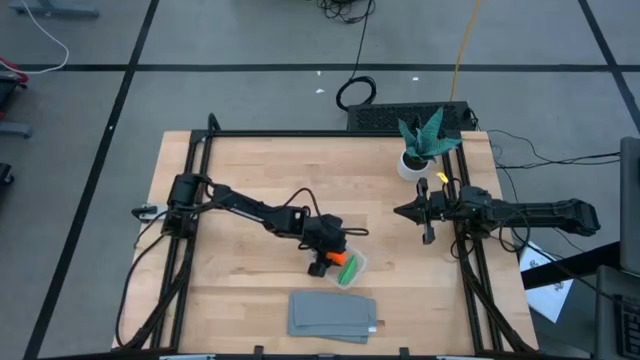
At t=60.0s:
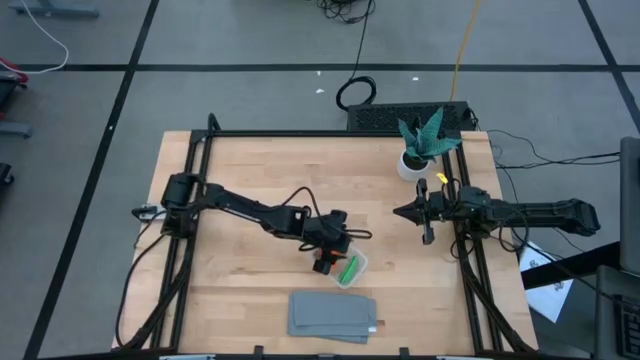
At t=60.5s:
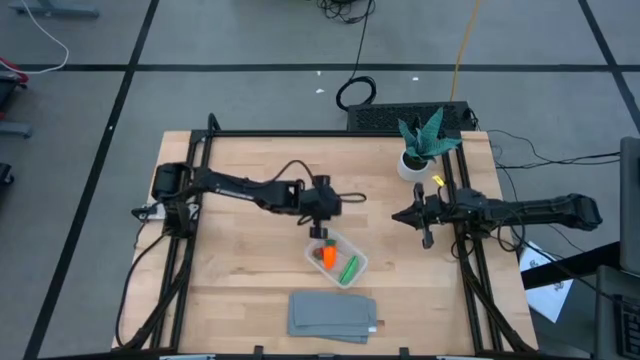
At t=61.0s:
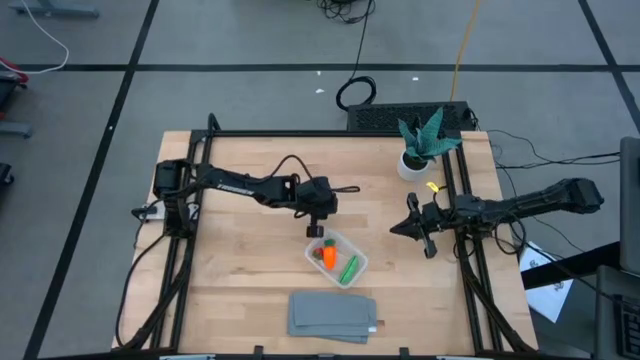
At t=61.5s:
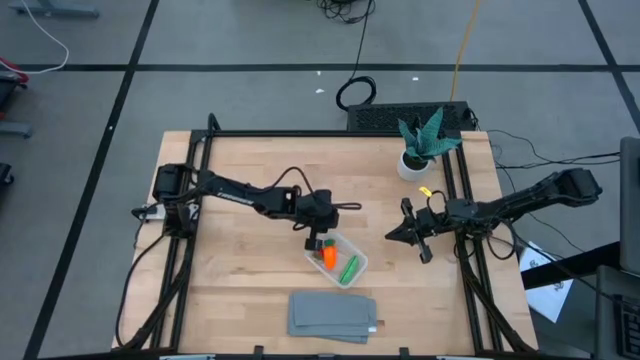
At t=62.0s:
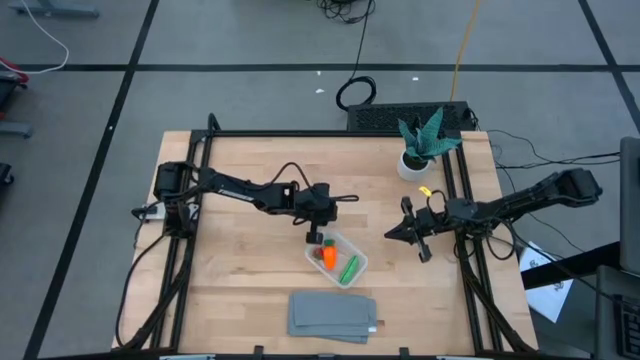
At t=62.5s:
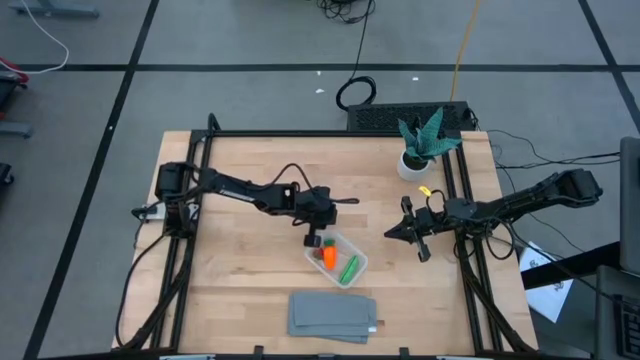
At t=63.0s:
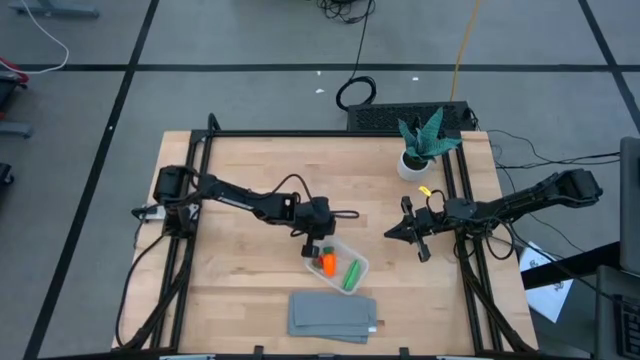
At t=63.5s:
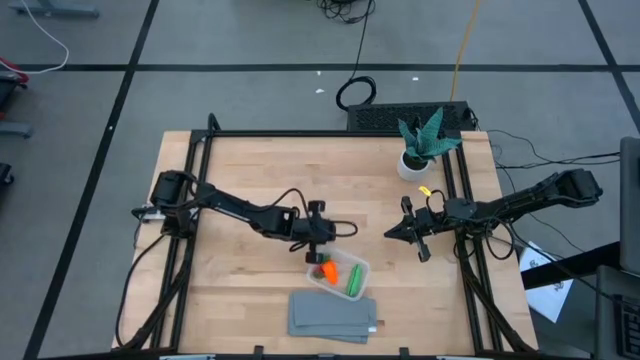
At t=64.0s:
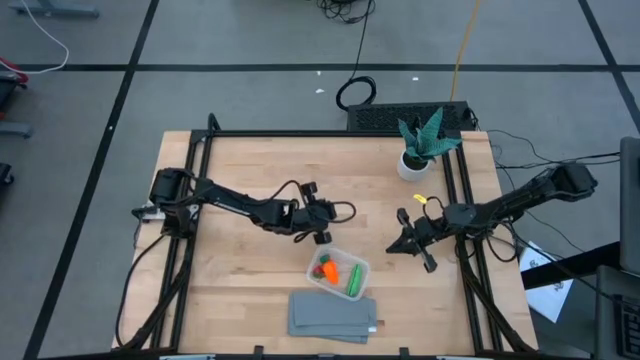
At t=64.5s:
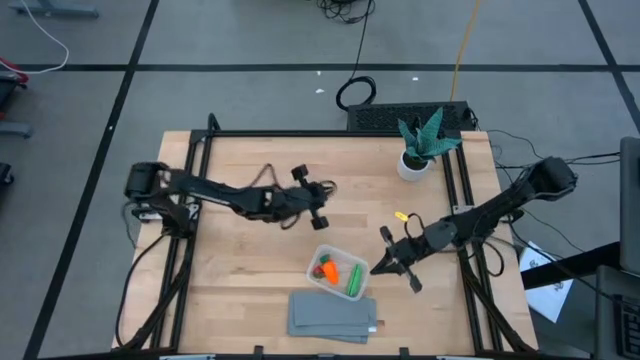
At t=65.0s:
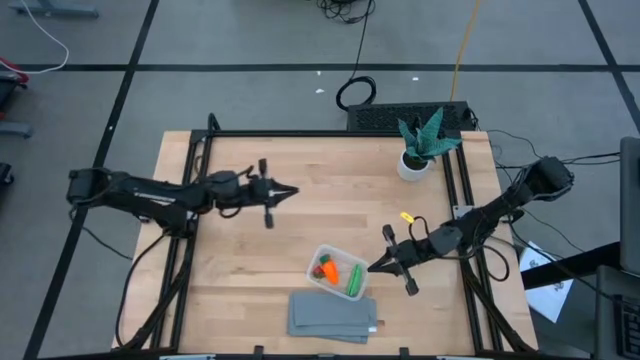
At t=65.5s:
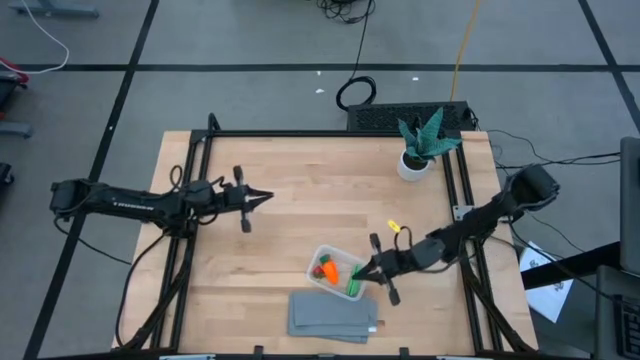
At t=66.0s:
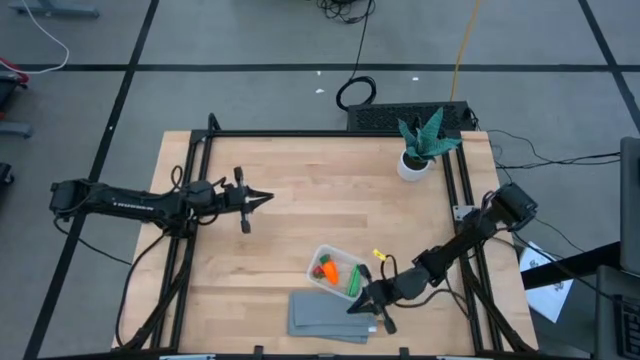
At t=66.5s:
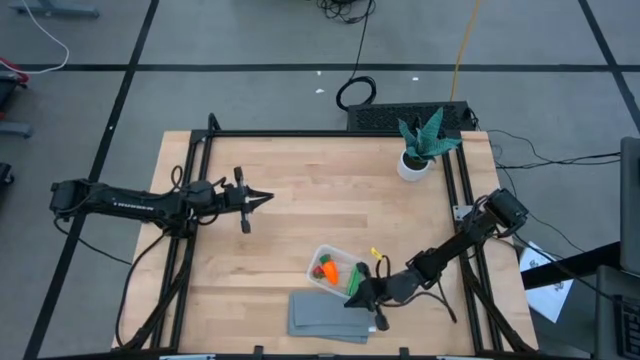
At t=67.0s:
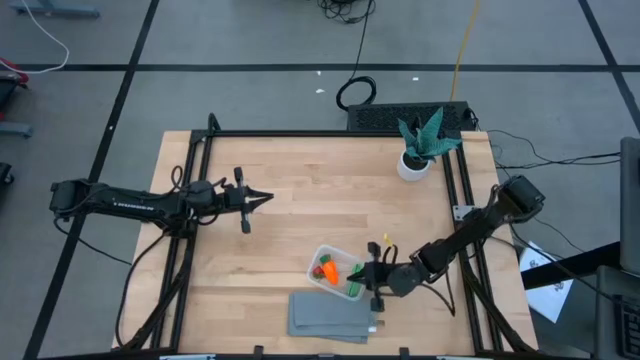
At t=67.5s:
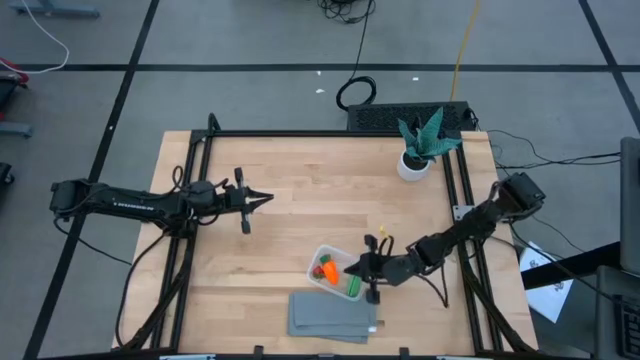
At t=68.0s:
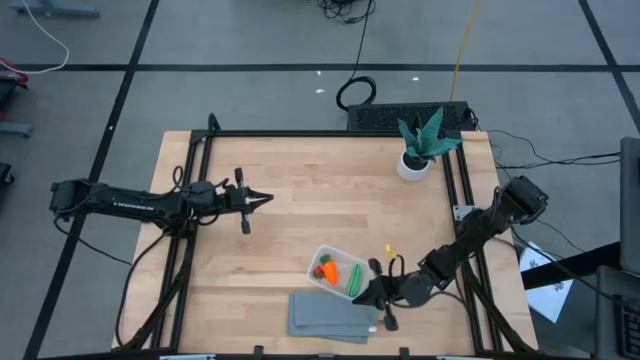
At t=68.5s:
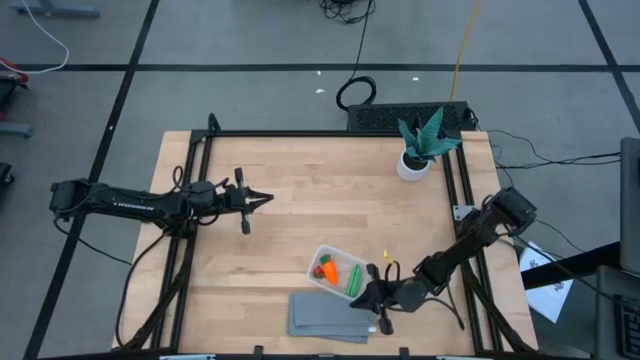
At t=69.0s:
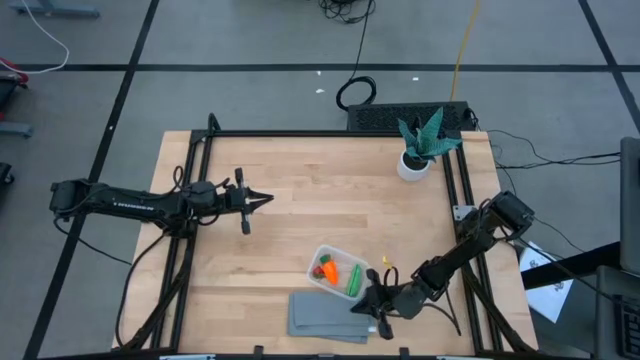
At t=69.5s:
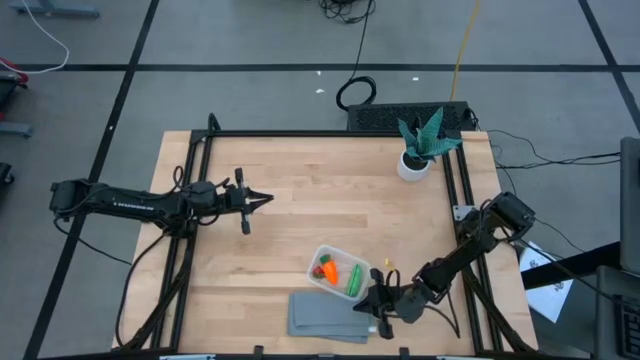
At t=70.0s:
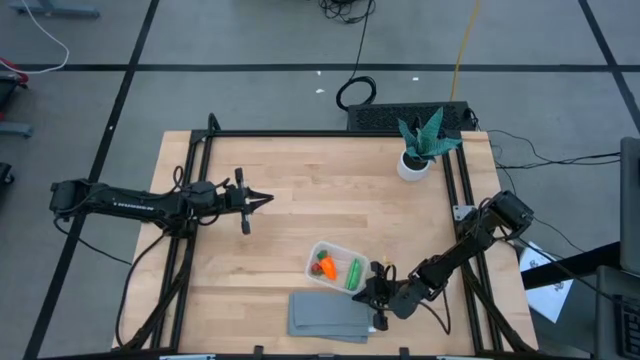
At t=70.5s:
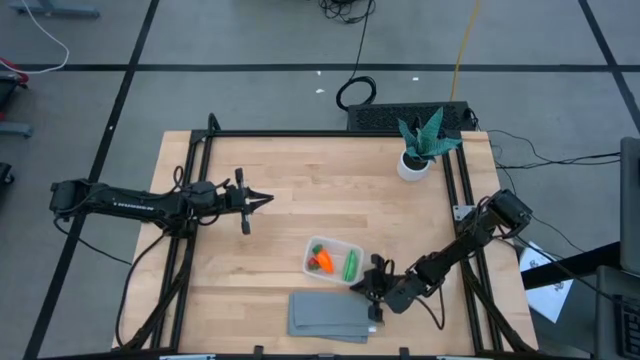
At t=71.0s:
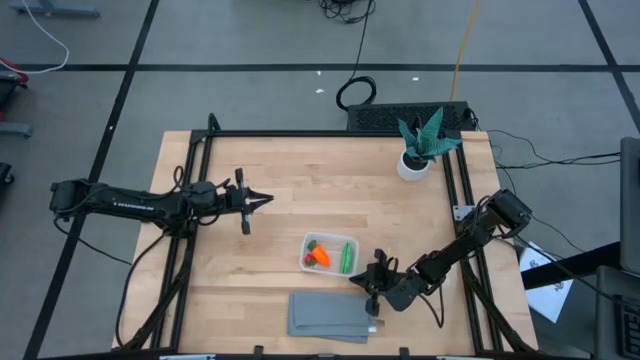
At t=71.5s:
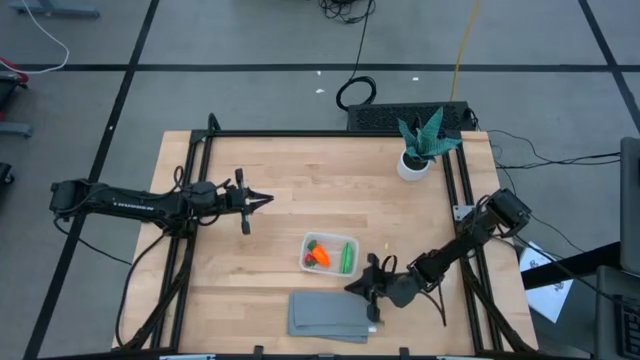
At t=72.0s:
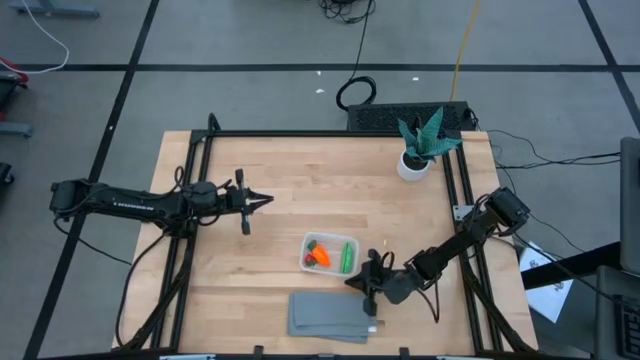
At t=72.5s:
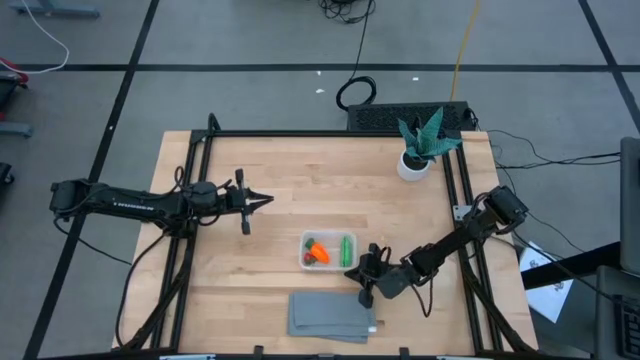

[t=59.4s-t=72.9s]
Task: Pick and placing Produce into tupperware
Adjust the transparent bin

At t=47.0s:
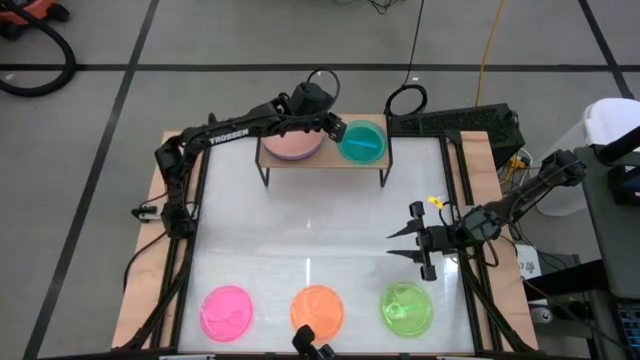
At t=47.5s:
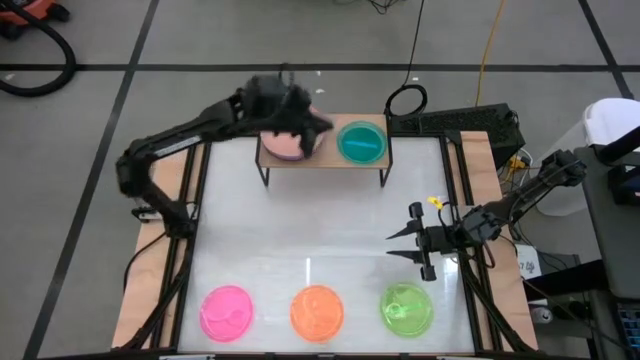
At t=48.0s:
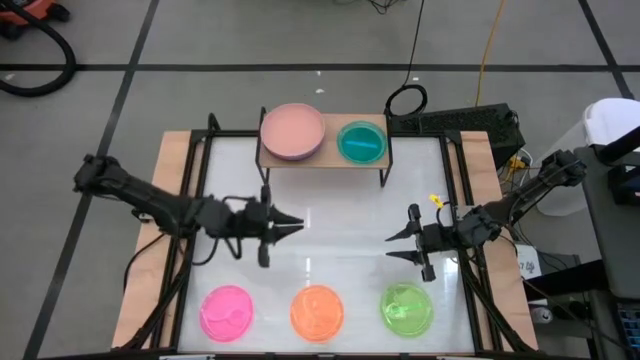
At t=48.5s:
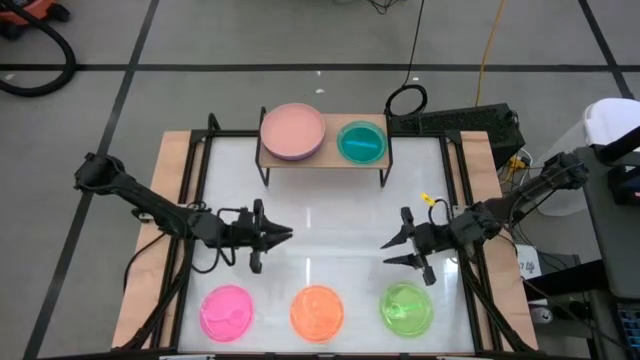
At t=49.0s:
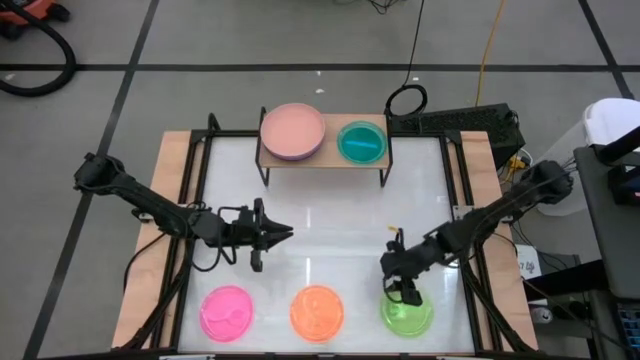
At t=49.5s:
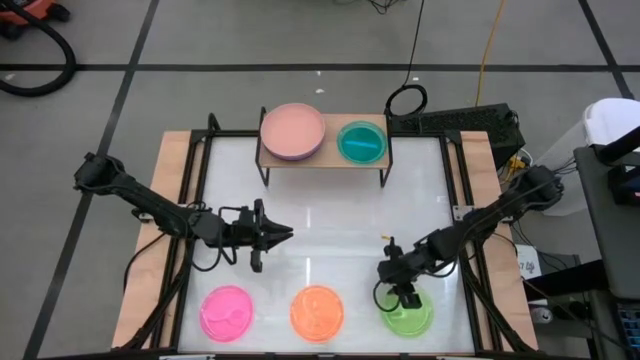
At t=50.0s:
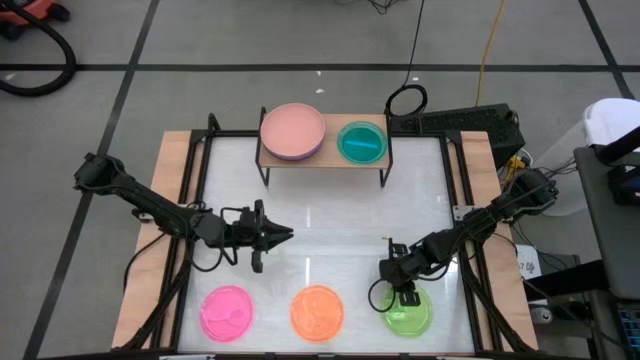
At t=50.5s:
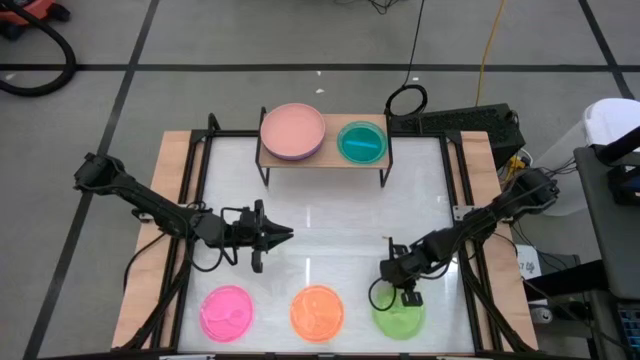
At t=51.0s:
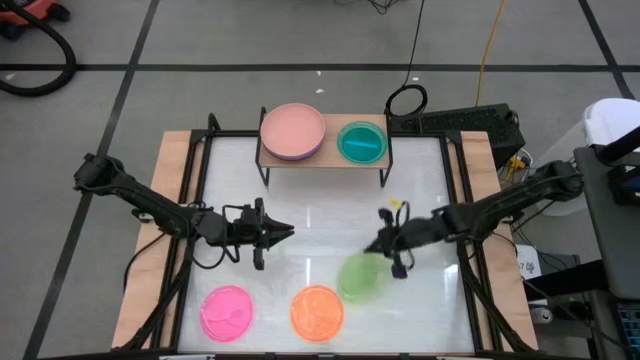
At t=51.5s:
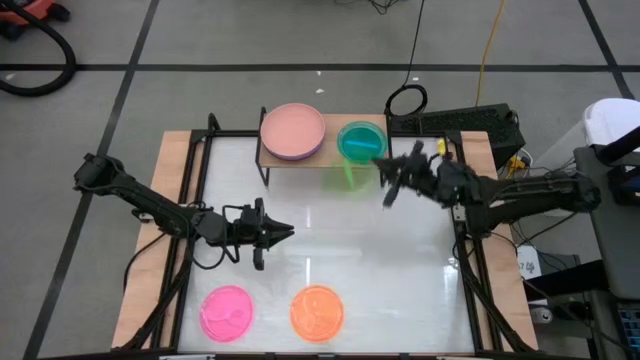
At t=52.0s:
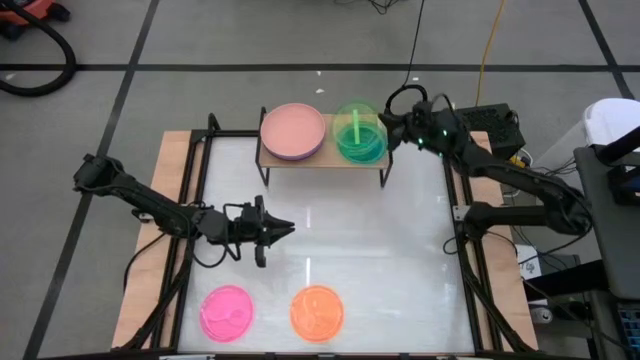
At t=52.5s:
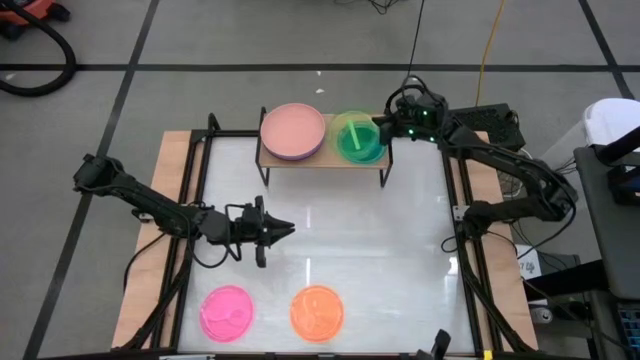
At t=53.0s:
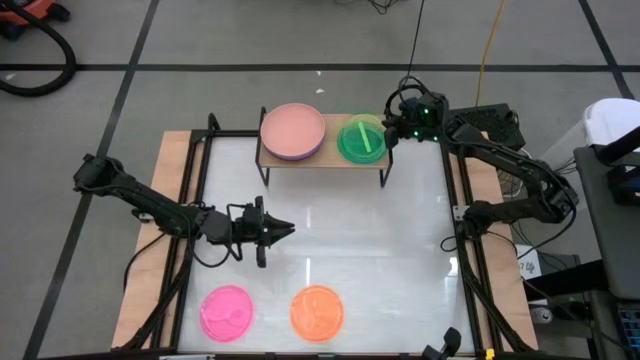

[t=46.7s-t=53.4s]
Task: Place and stack plates onto a shelf
Stack the transparent green plate on top of the transparent blue plate on the shelf

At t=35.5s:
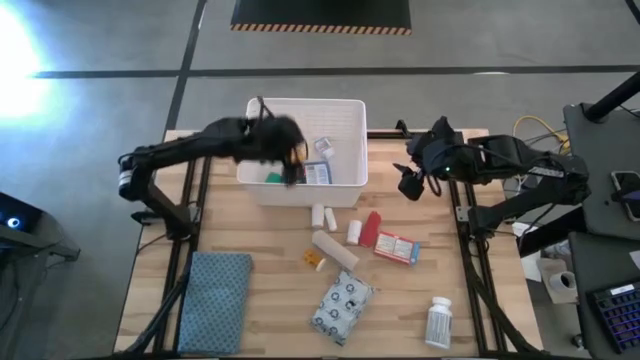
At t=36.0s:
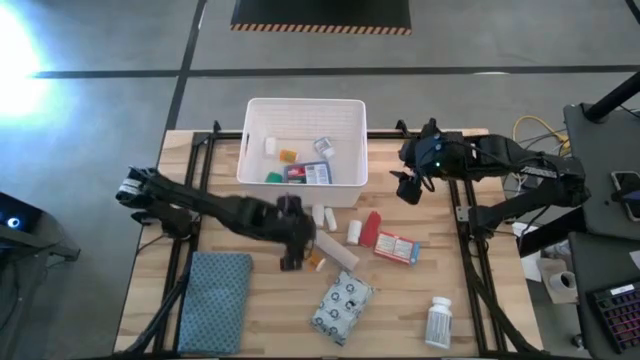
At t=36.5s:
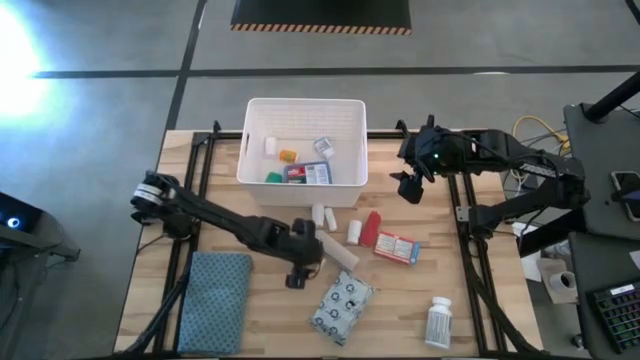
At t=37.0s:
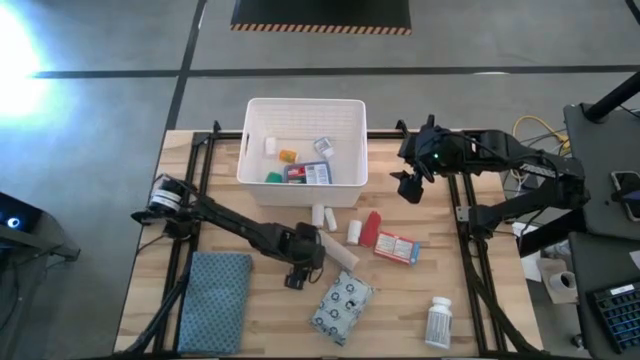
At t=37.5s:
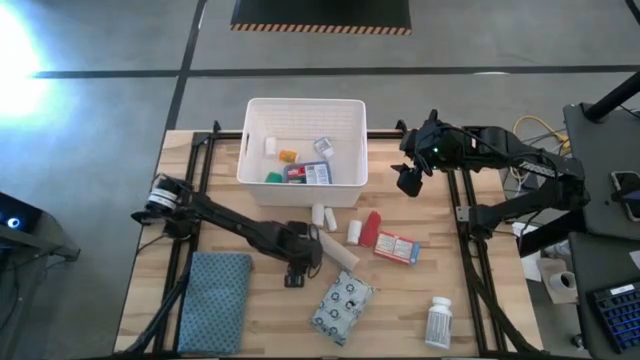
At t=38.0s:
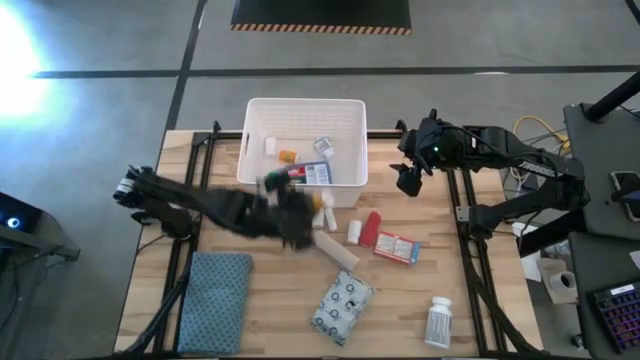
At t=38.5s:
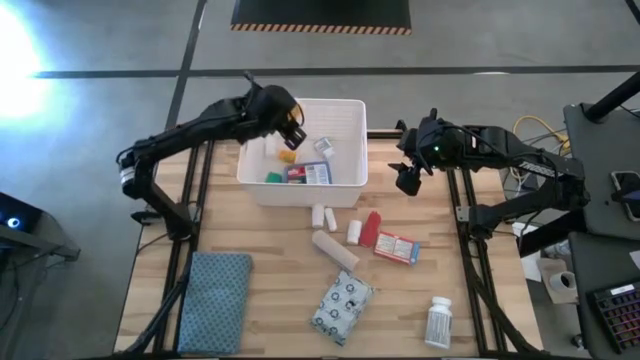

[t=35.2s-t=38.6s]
Task: Pick & place medical supplies in basket/bin
Put the orange pill bottle into the white bin
